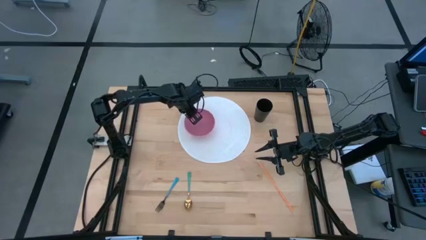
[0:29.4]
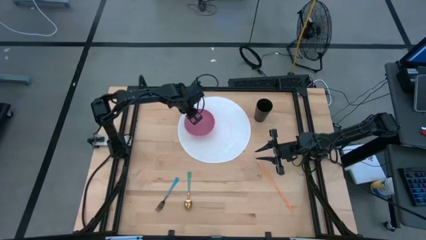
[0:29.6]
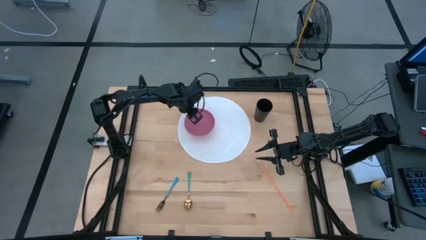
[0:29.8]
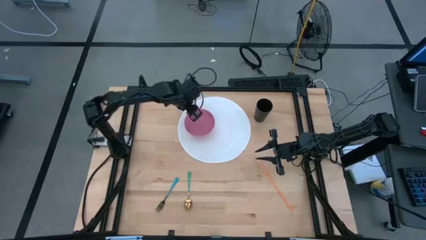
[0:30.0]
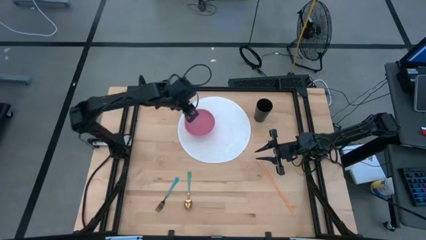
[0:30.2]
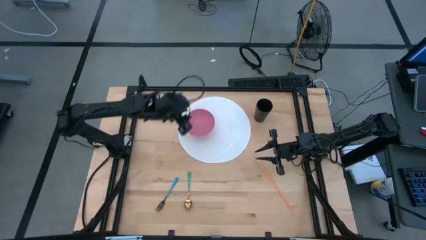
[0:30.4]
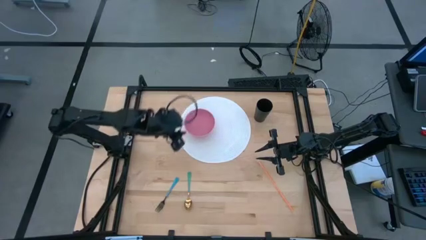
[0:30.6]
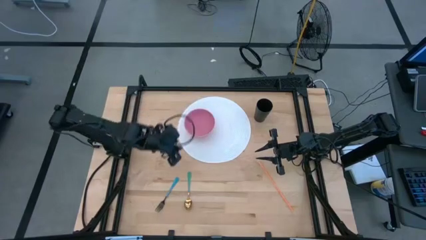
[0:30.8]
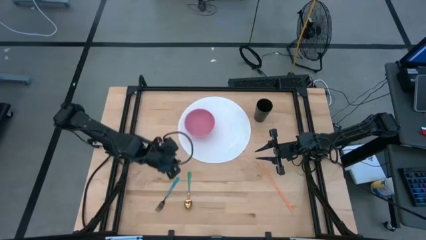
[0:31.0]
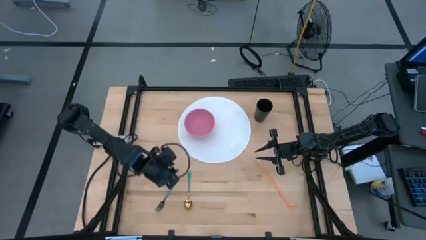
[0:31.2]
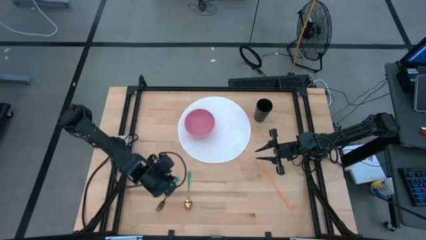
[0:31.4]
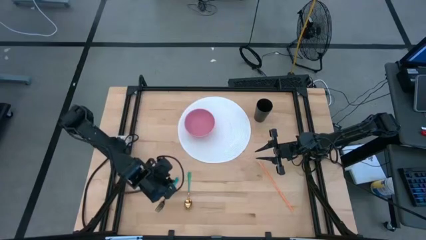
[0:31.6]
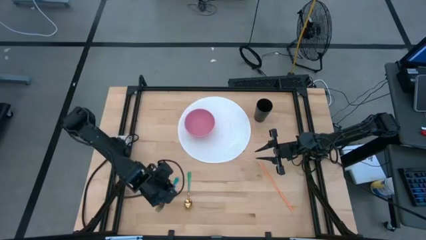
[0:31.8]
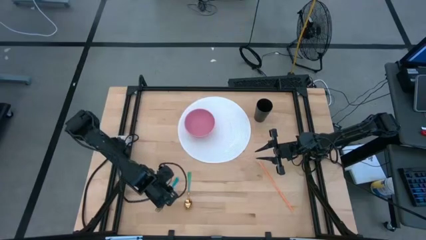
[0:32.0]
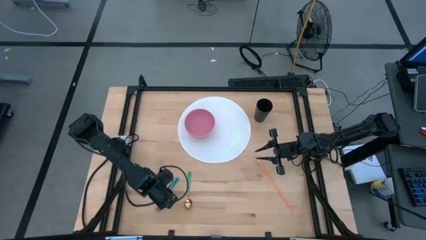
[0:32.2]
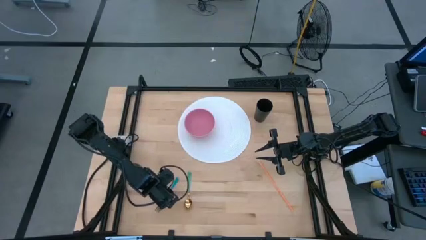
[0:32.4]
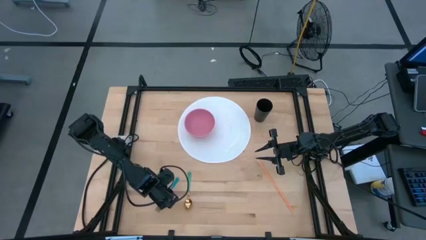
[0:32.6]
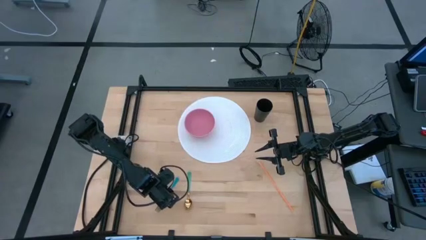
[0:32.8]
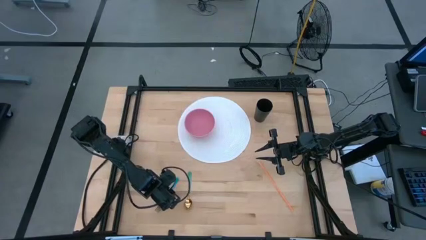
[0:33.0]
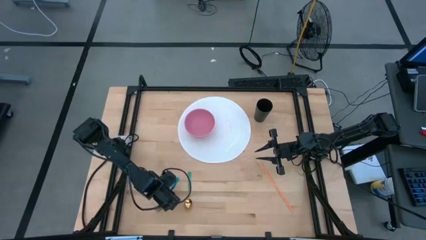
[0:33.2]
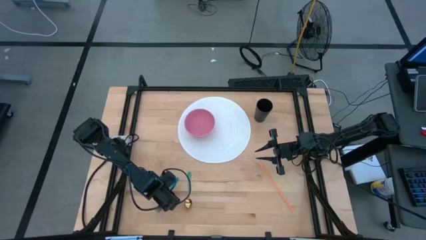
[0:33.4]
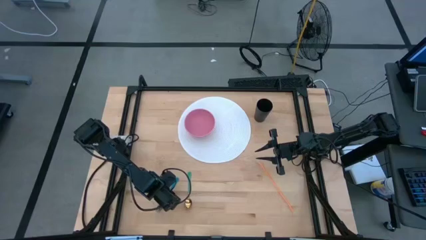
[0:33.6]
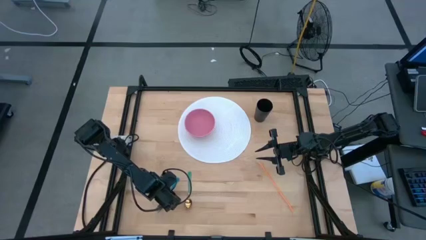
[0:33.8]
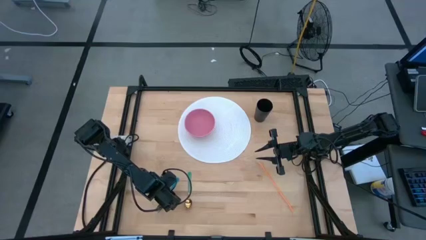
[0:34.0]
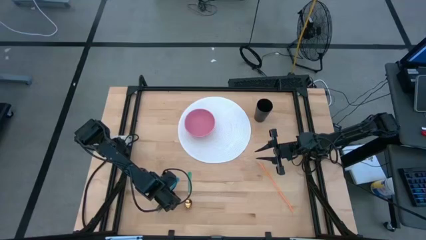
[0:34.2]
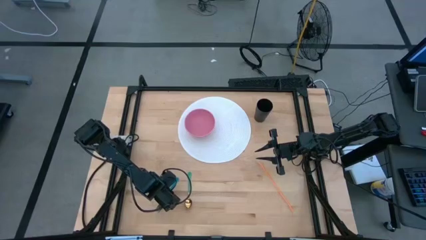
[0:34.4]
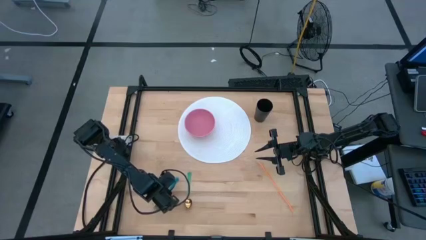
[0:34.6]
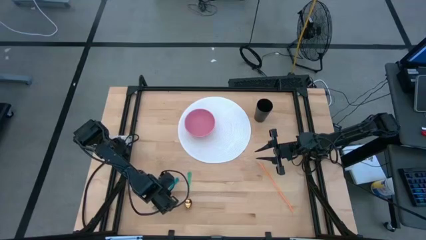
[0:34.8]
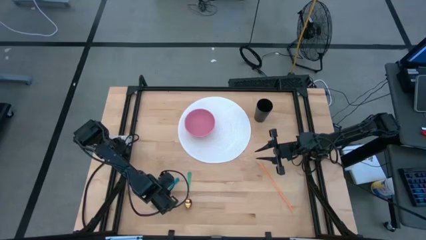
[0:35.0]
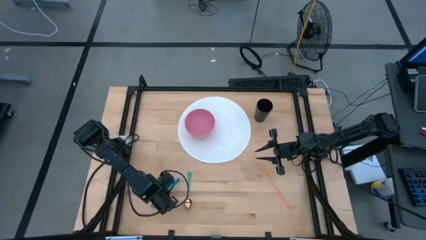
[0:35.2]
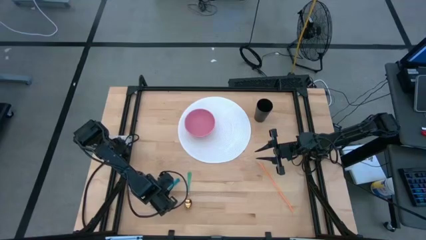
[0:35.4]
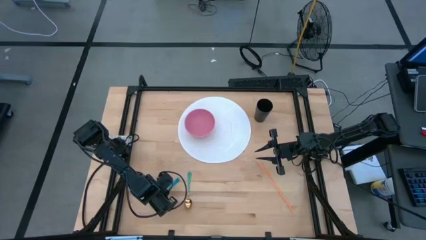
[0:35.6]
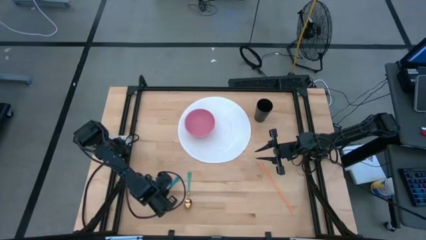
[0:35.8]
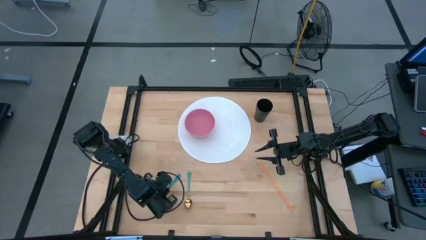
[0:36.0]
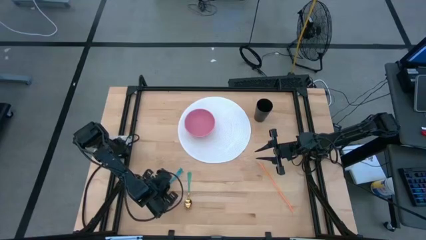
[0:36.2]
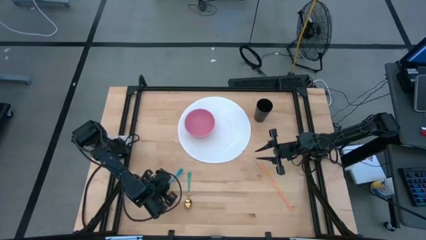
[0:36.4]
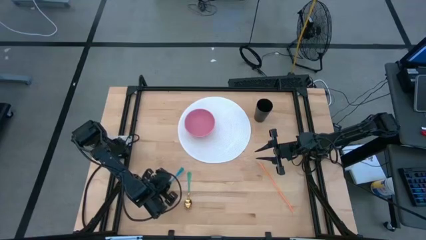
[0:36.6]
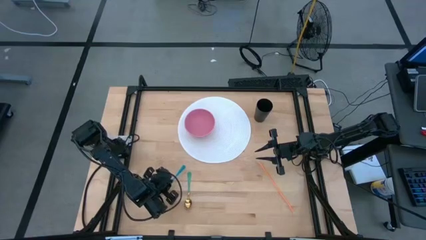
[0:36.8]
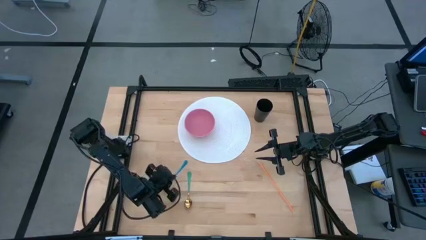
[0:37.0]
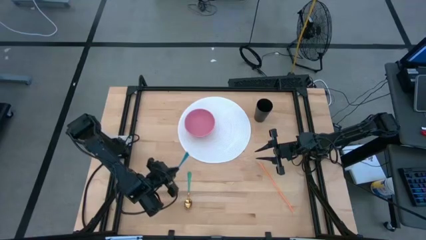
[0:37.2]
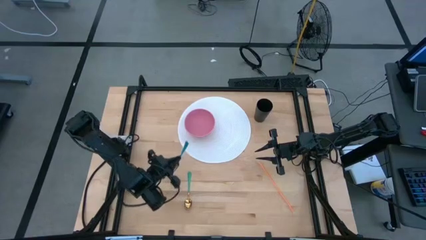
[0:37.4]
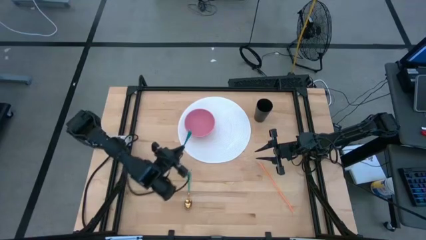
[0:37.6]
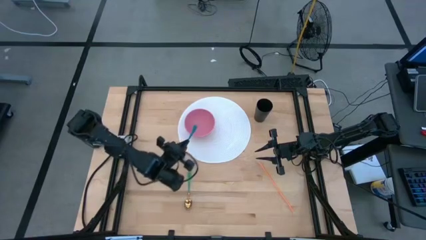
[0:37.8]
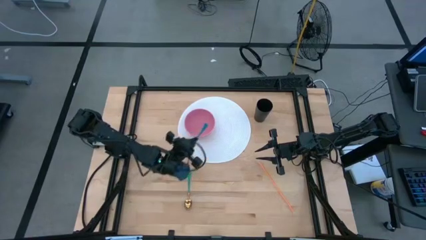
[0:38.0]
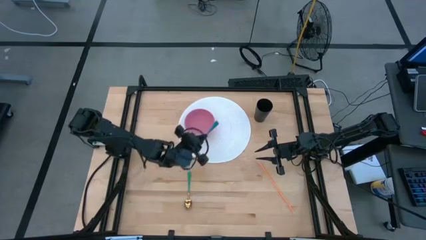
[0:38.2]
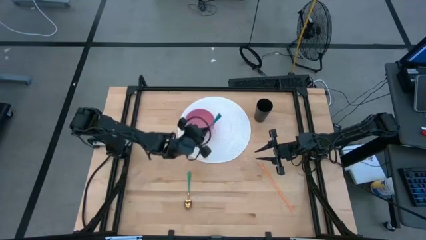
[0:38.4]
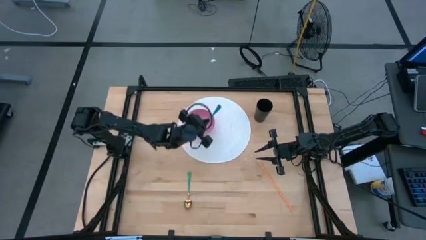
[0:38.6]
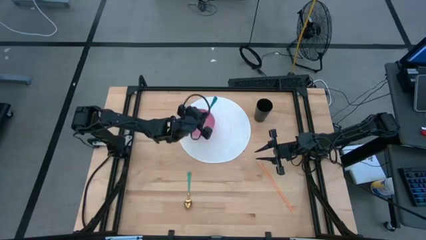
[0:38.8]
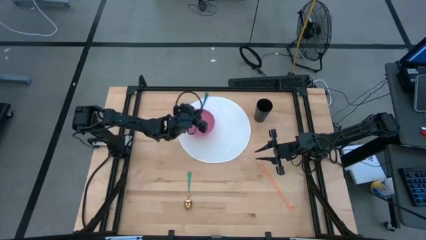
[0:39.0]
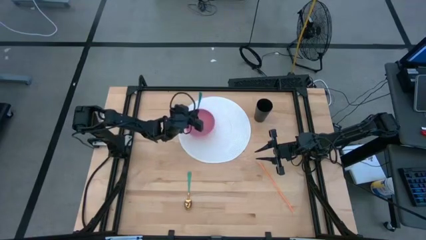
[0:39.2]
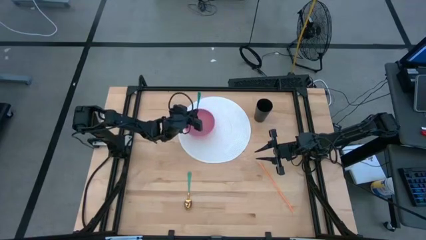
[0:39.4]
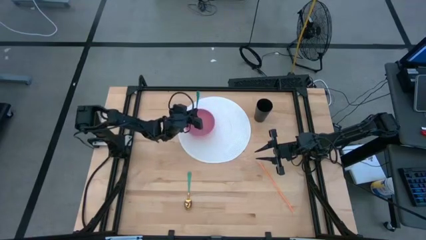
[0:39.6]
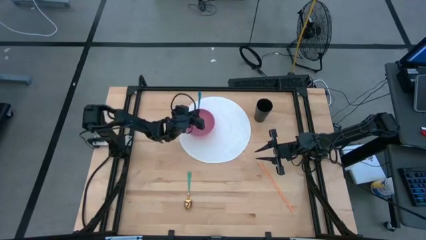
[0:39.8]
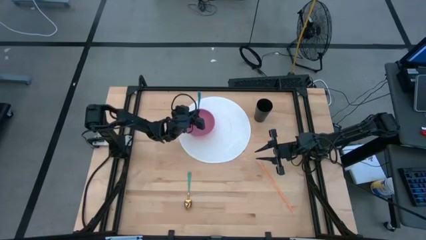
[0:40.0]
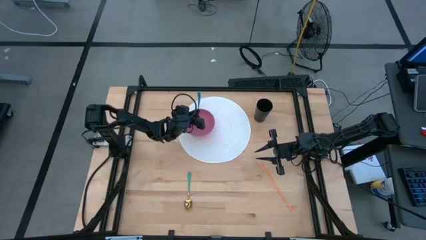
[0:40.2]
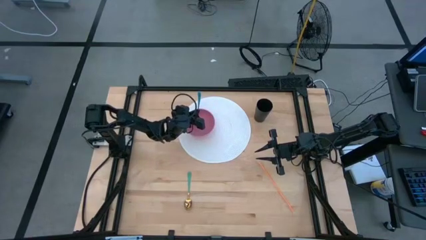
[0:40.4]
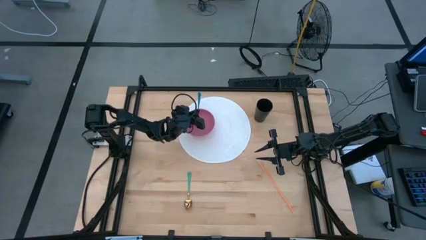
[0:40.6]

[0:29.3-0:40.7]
Task: Pick & Place Utensil
Put the blue fork into the pink bowl

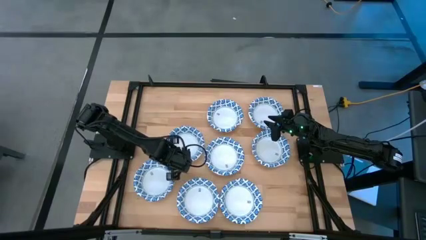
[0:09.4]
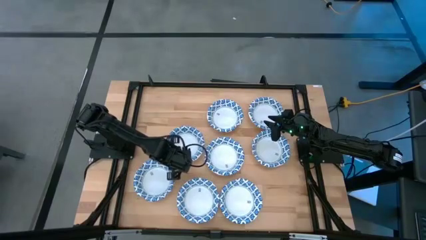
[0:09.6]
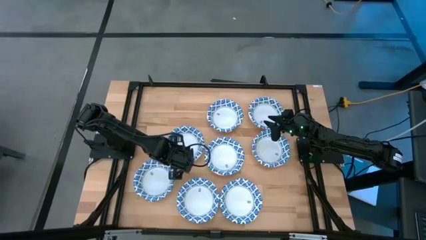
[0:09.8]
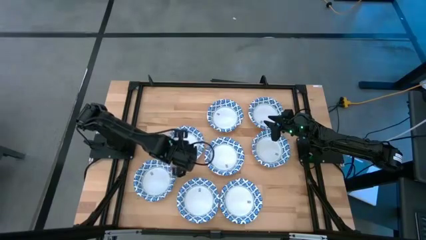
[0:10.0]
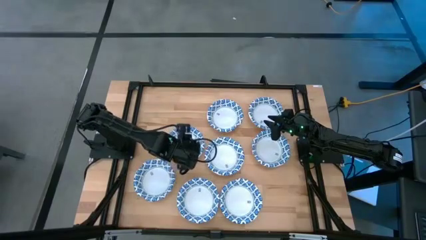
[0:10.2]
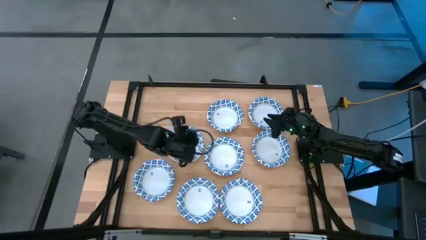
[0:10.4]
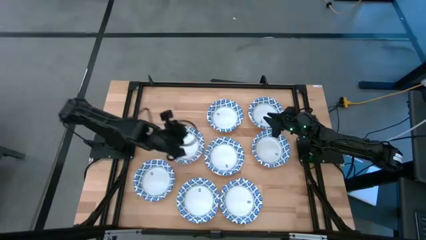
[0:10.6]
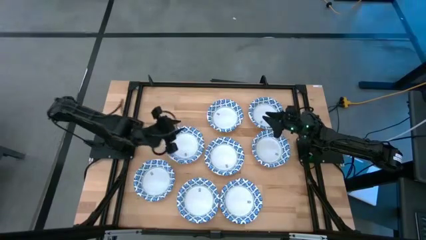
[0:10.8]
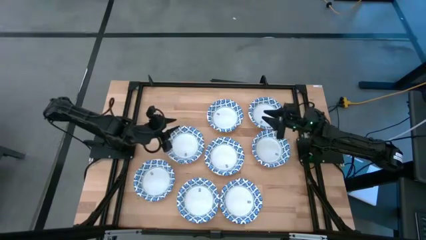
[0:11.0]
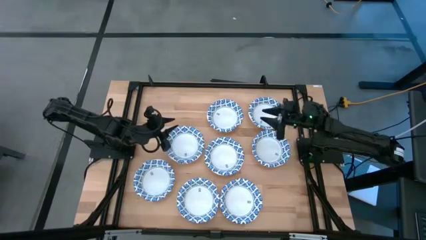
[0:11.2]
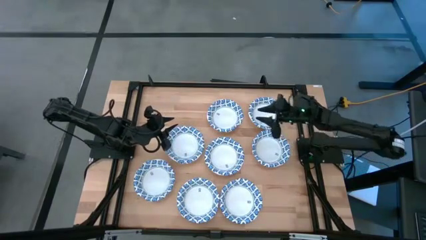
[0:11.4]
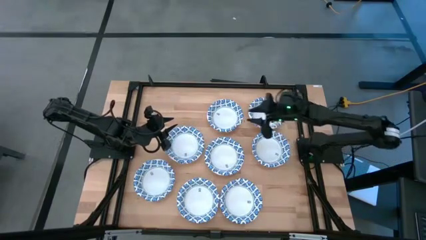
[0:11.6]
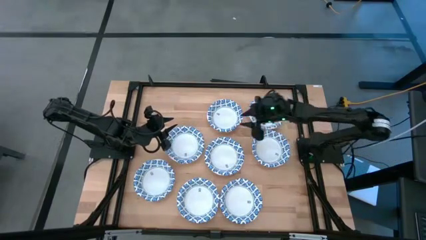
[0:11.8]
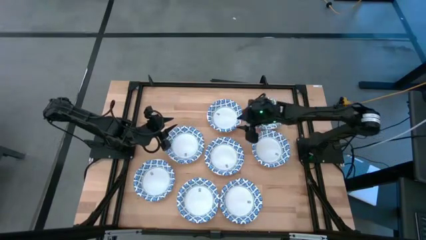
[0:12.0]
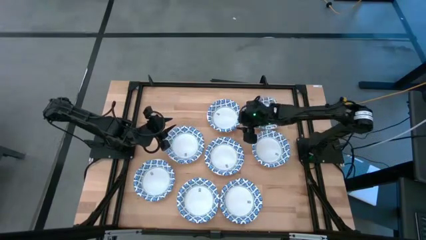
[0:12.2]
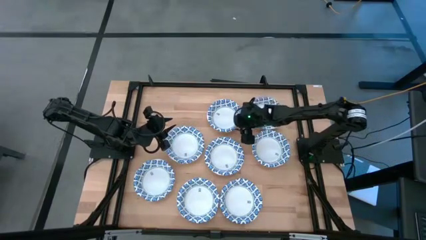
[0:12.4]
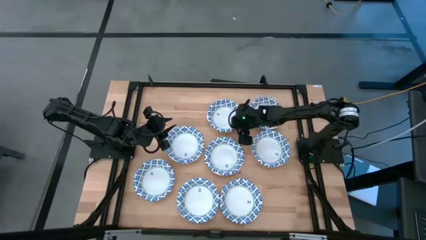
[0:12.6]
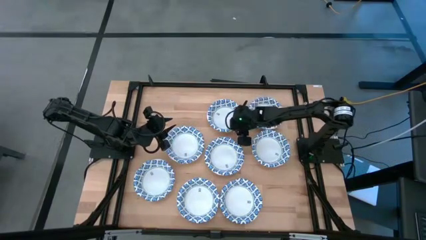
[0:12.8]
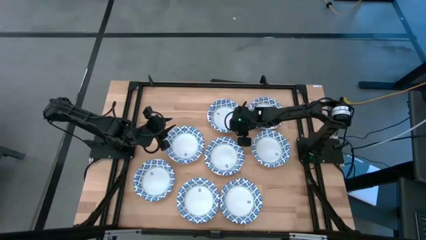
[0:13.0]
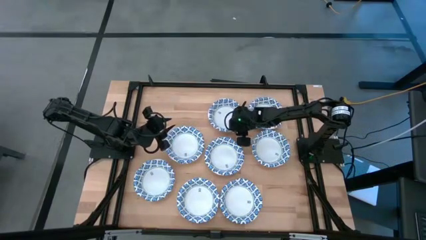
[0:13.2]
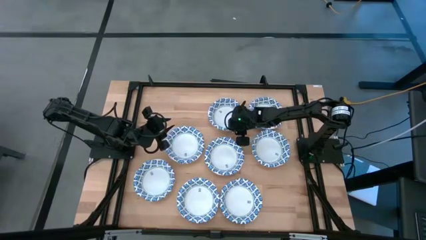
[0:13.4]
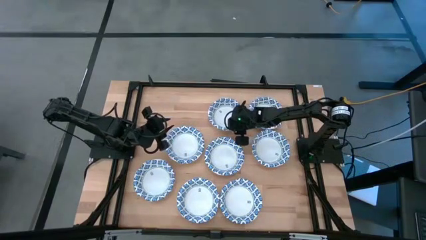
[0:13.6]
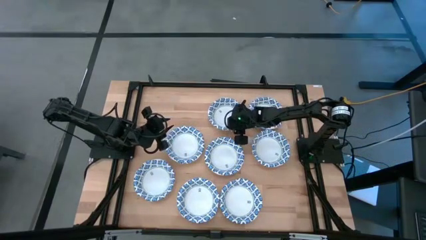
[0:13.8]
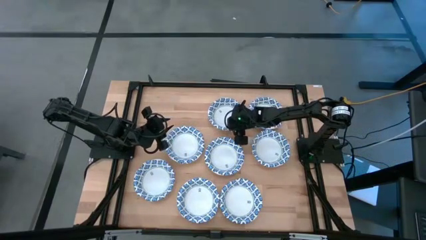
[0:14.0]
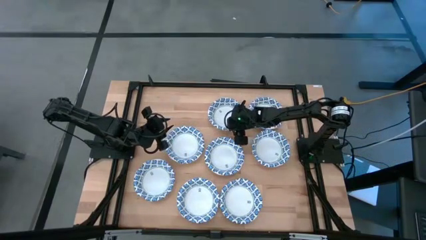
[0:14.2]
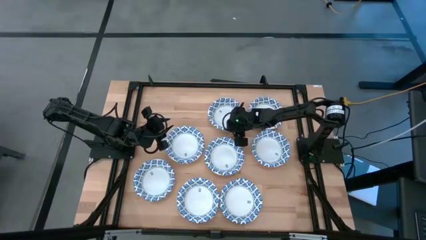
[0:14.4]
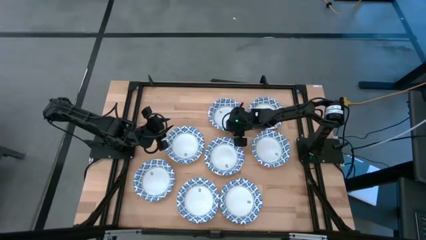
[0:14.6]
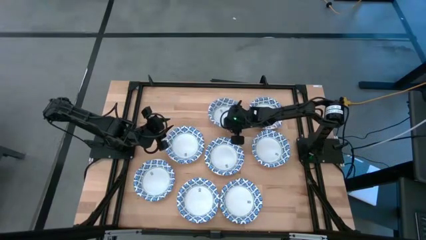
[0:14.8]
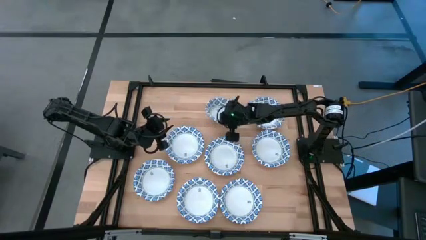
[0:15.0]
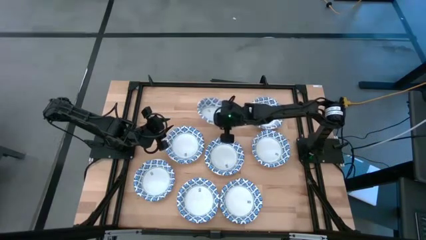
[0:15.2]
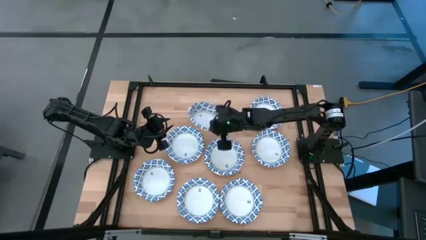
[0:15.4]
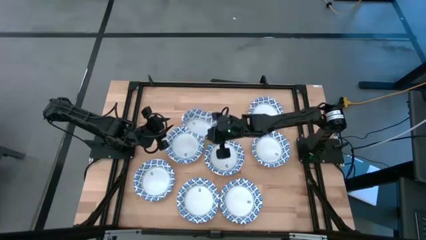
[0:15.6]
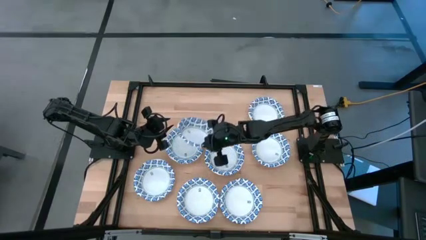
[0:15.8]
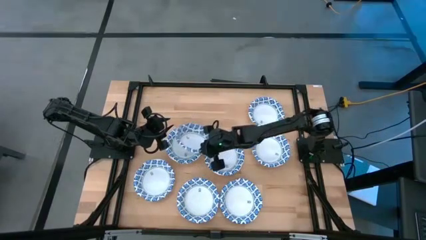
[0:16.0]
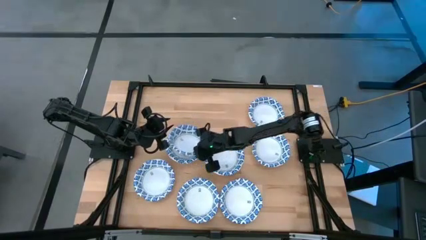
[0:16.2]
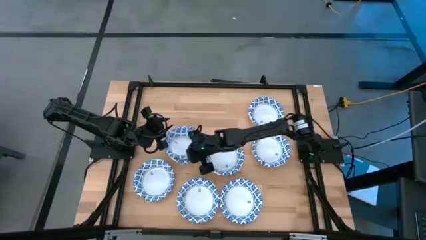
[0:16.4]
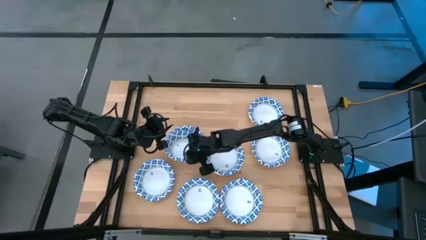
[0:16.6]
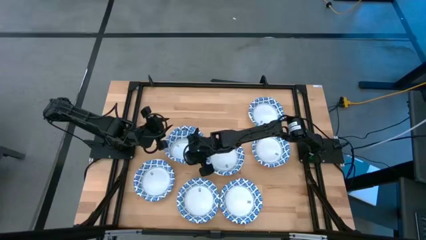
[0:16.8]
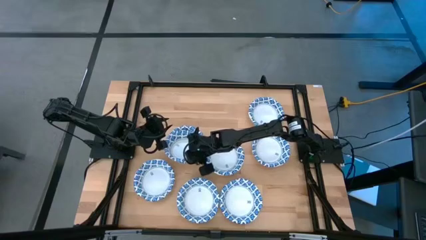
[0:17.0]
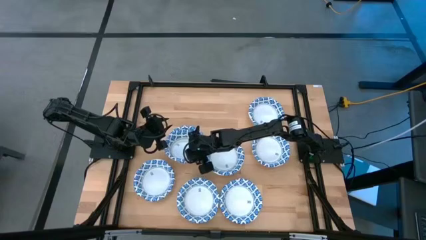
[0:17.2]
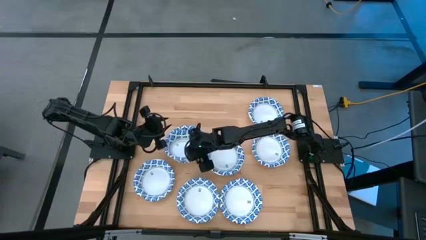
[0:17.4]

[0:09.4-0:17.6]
Task: Nest bowls inside each other
Stack the white bowl on the white bowl
